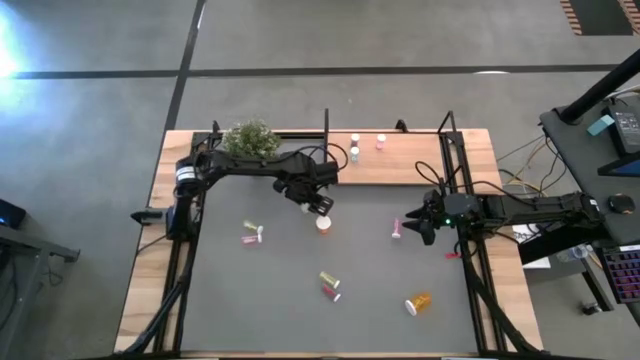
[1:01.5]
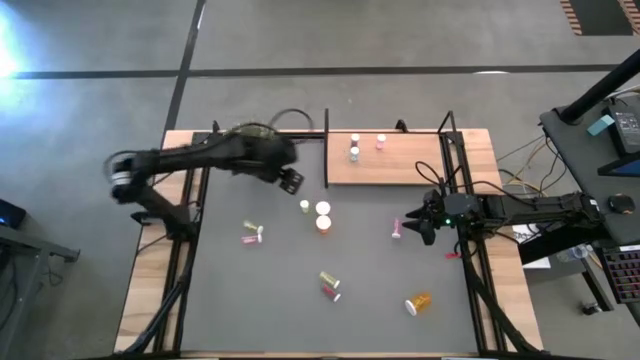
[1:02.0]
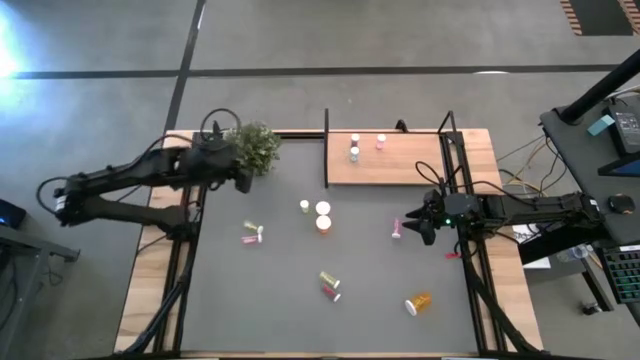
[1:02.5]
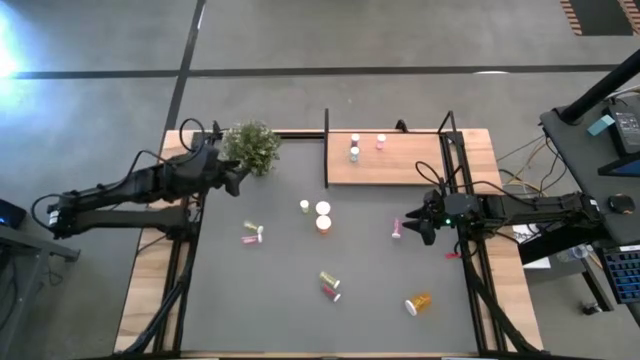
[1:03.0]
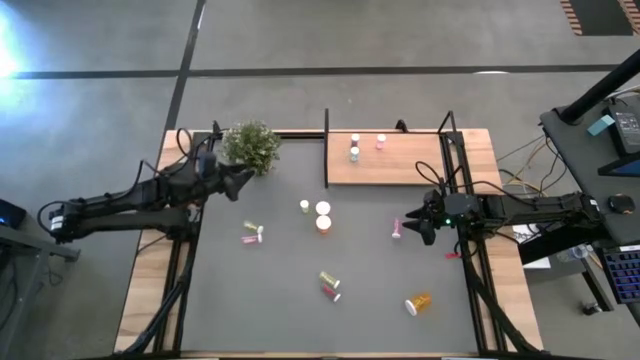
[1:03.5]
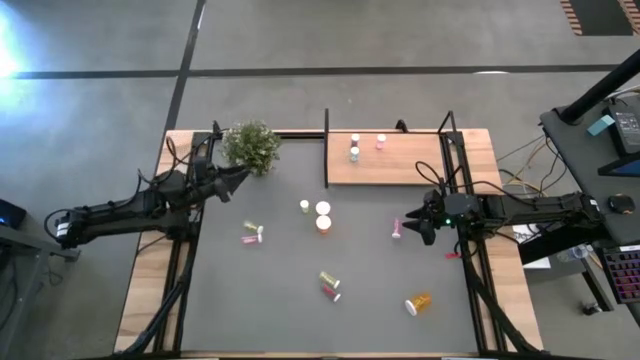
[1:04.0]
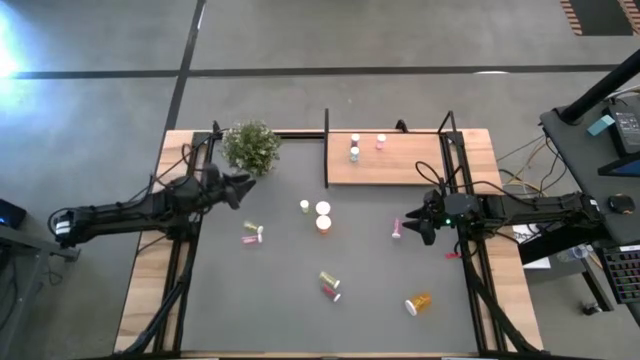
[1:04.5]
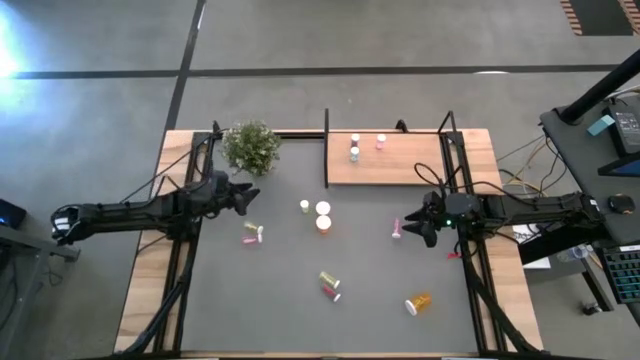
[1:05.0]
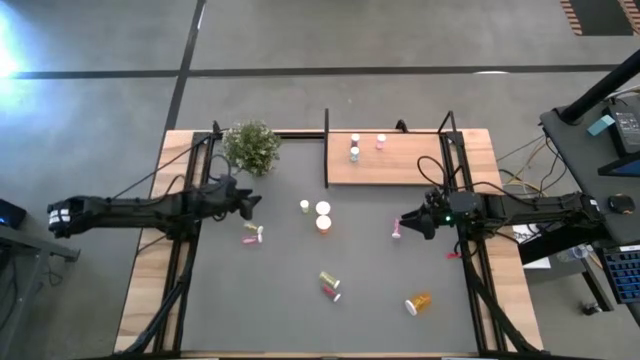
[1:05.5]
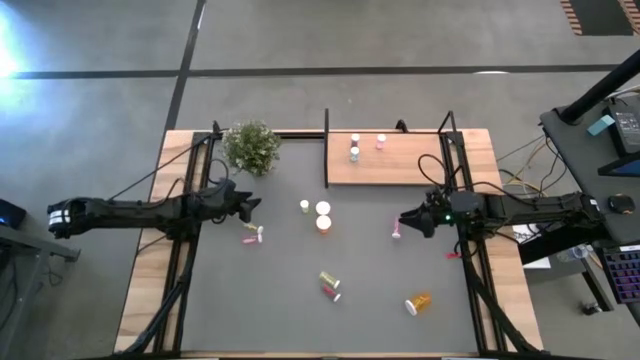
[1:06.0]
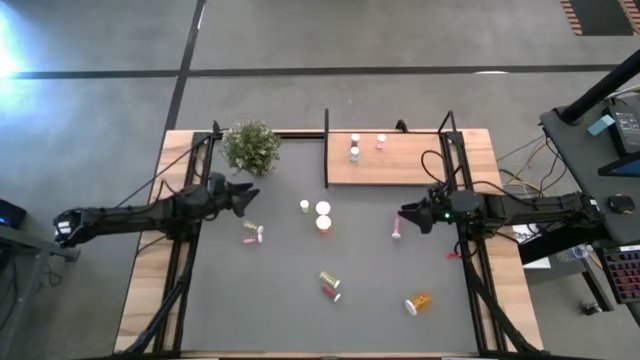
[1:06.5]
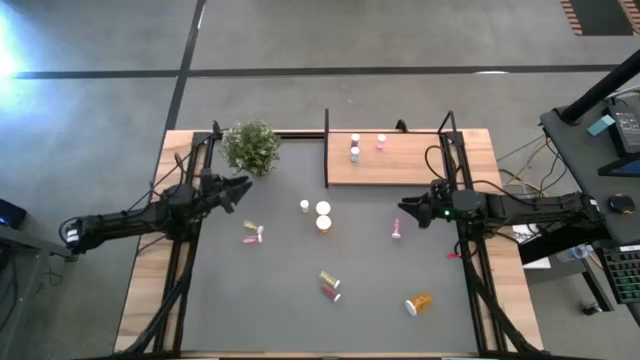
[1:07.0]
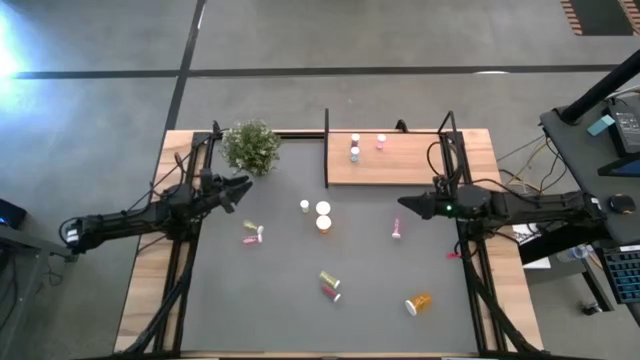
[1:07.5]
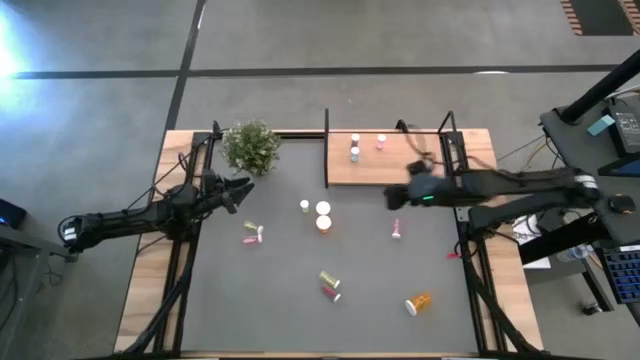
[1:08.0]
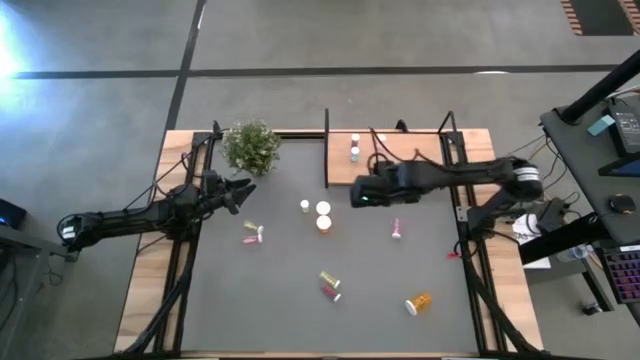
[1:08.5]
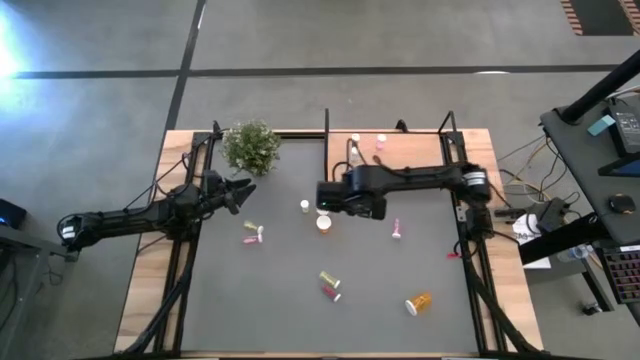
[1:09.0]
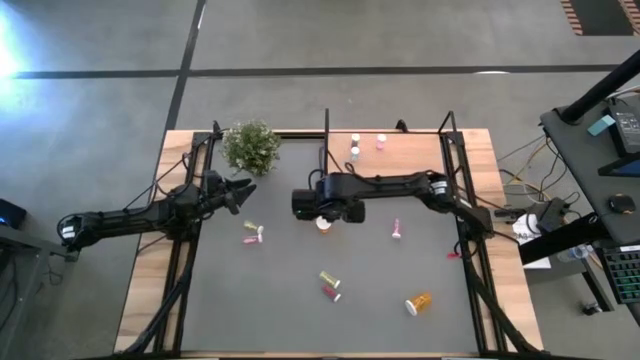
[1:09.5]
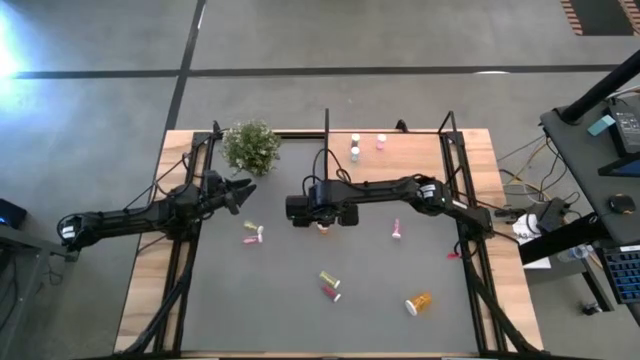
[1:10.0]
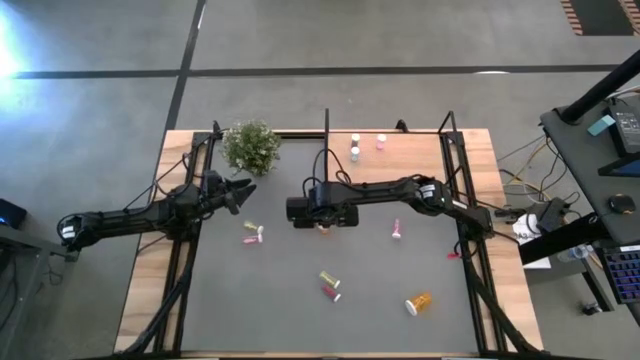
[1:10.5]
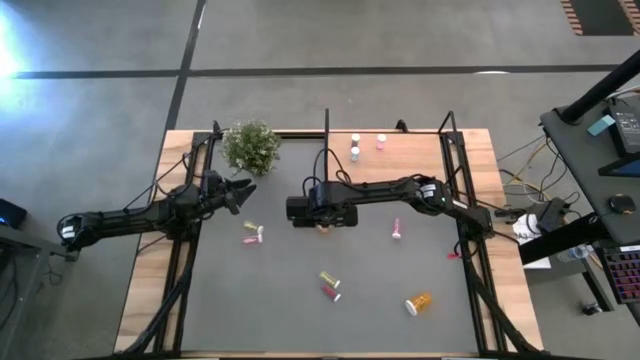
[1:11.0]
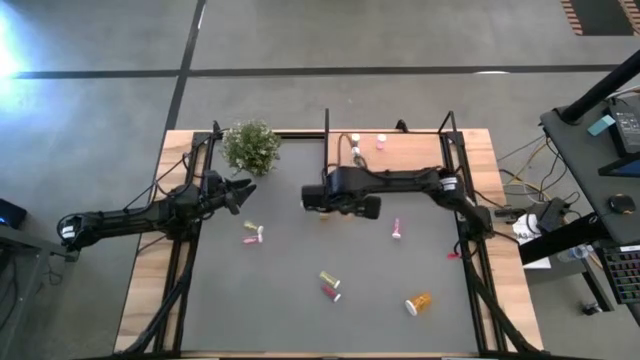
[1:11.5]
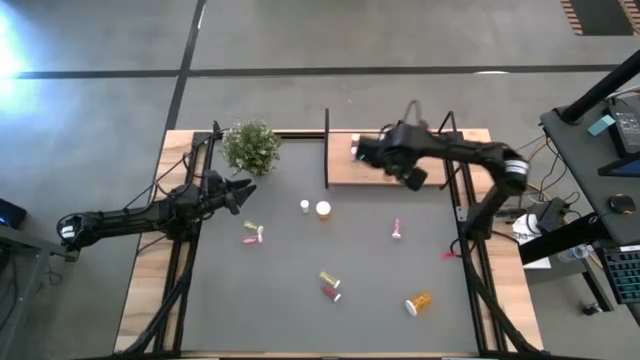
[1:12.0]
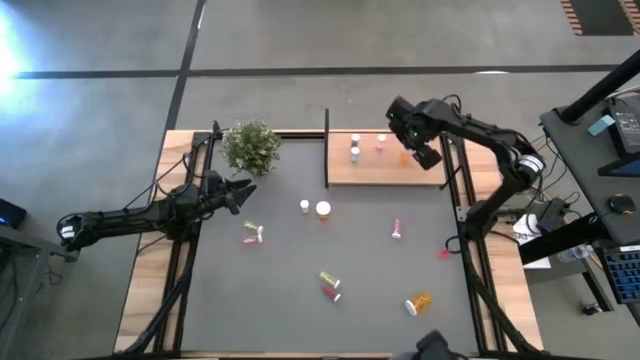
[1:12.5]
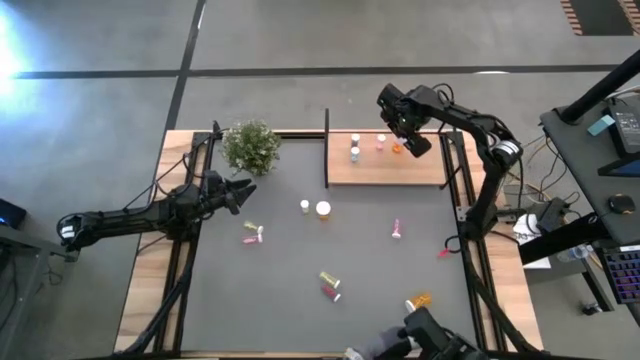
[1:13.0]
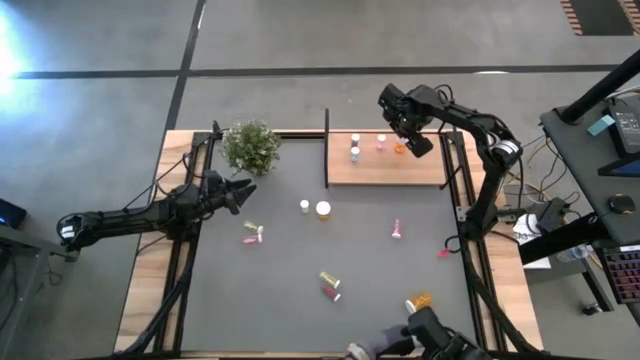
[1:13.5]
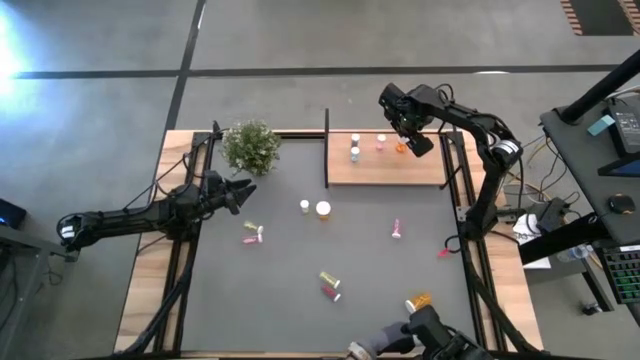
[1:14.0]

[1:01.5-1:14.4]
Task: Pick and place medicine bottles onto shelf by color
Put the middle orange pill bottle on the shelf

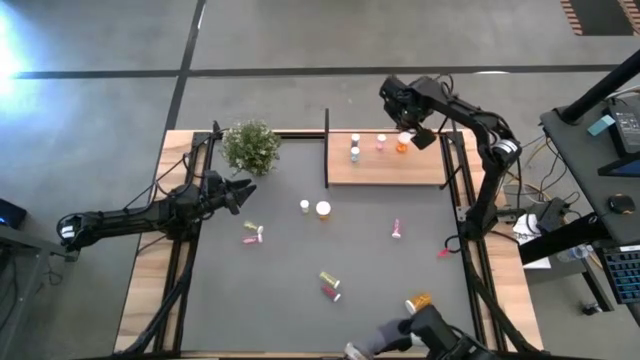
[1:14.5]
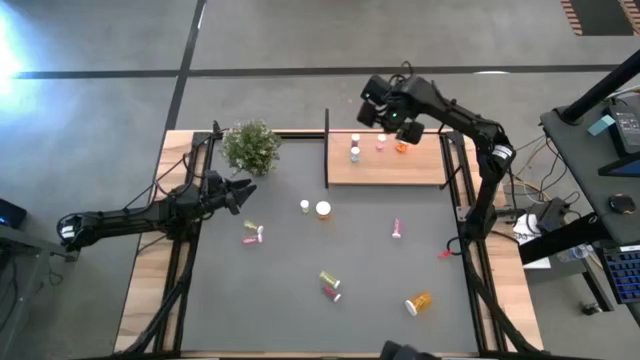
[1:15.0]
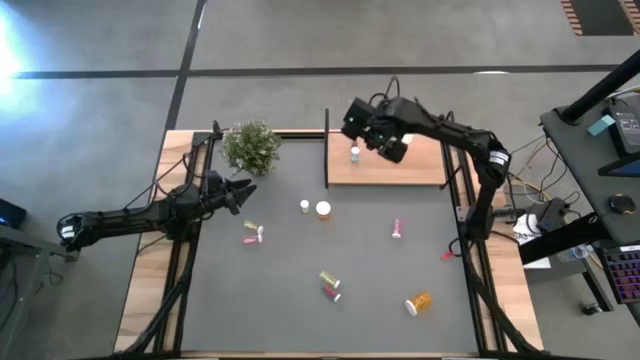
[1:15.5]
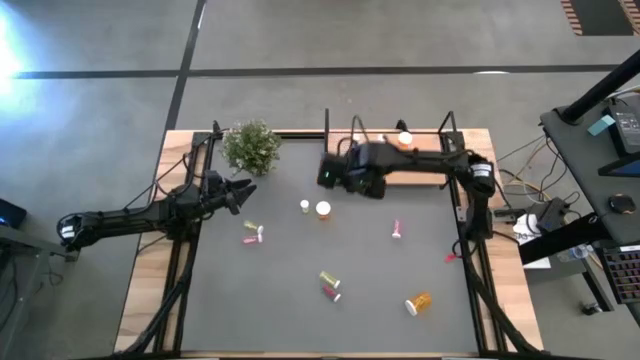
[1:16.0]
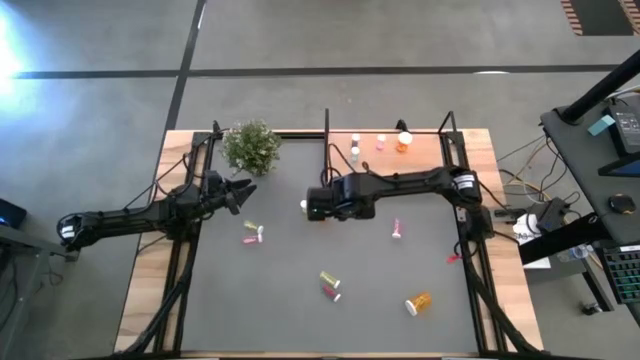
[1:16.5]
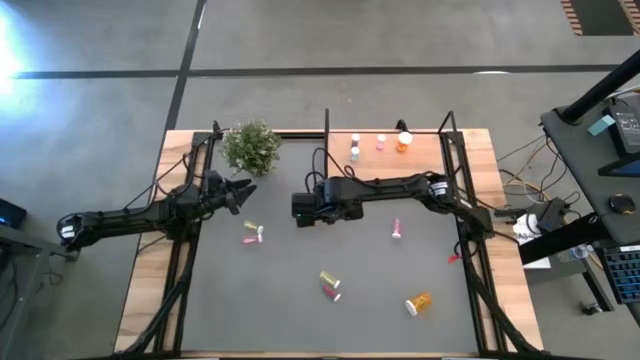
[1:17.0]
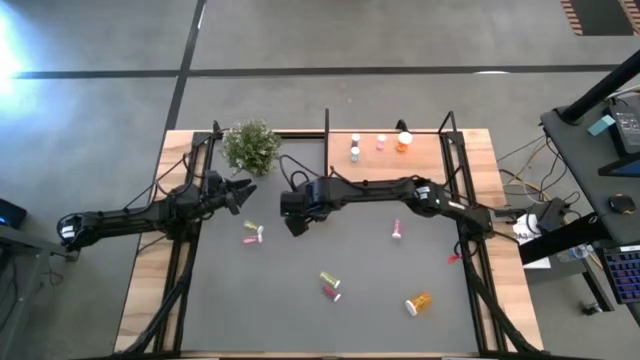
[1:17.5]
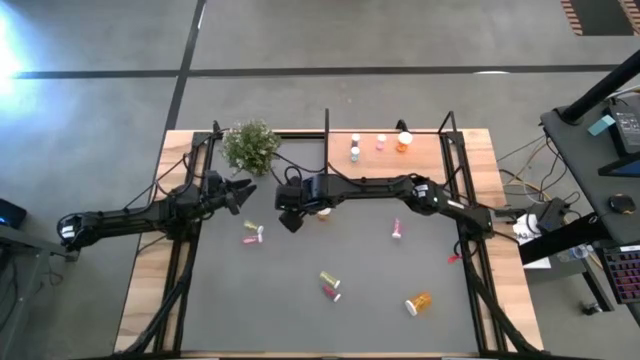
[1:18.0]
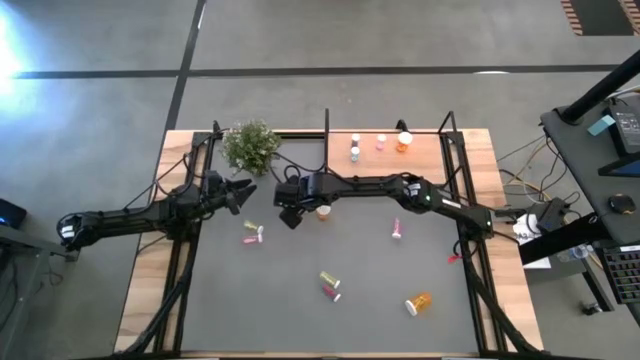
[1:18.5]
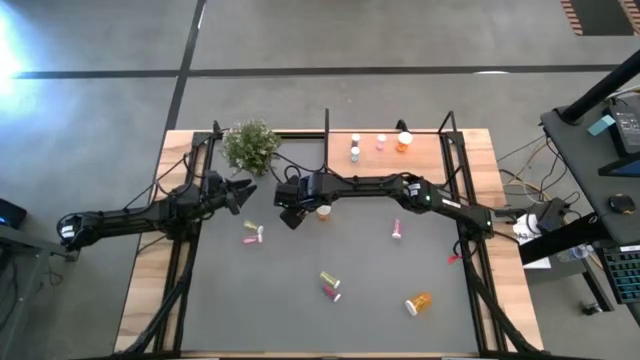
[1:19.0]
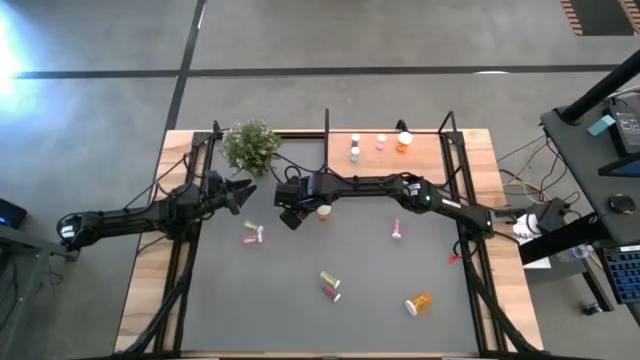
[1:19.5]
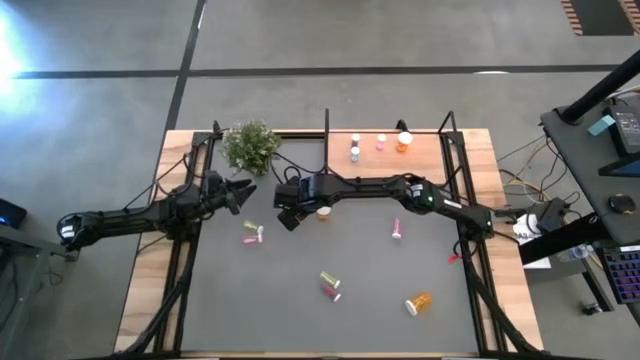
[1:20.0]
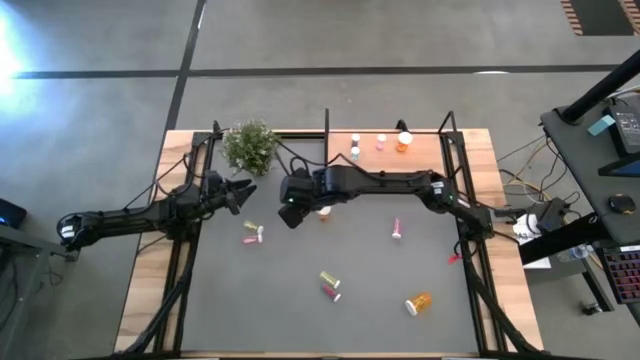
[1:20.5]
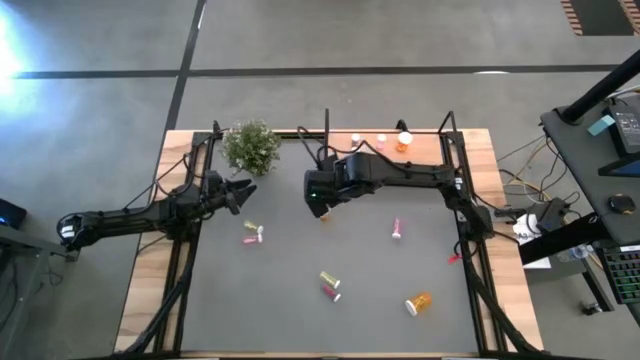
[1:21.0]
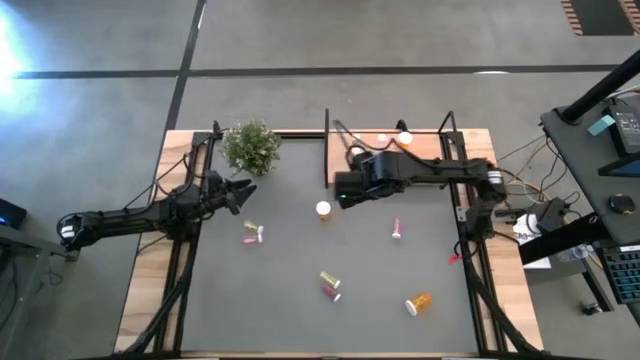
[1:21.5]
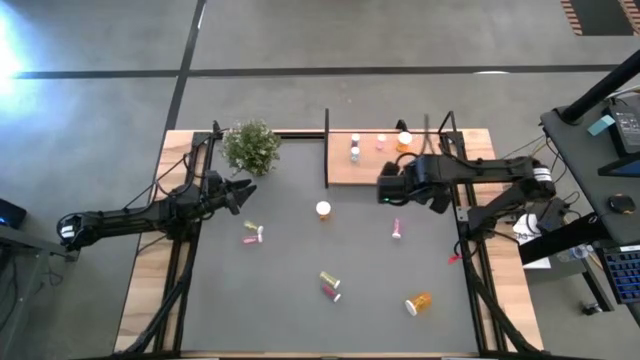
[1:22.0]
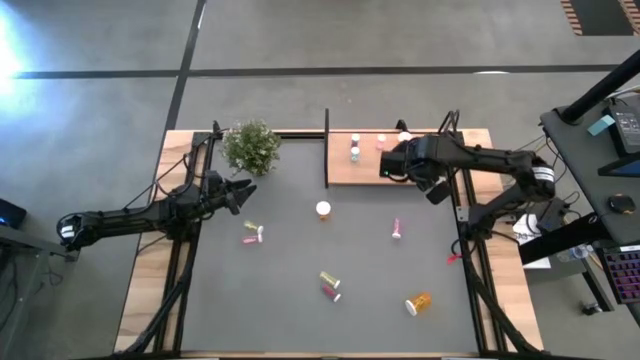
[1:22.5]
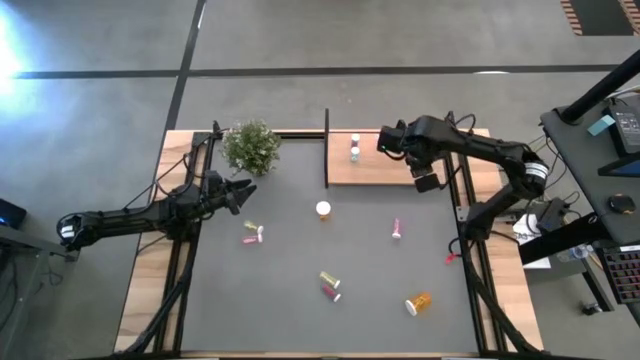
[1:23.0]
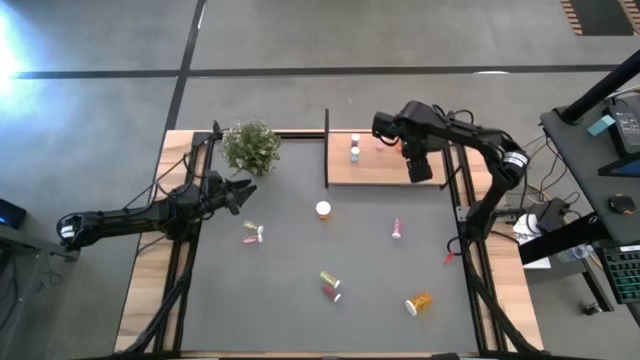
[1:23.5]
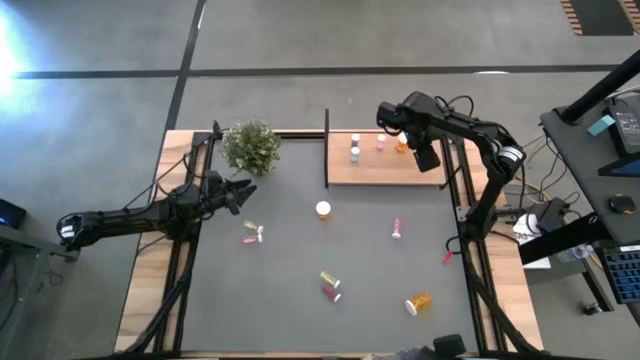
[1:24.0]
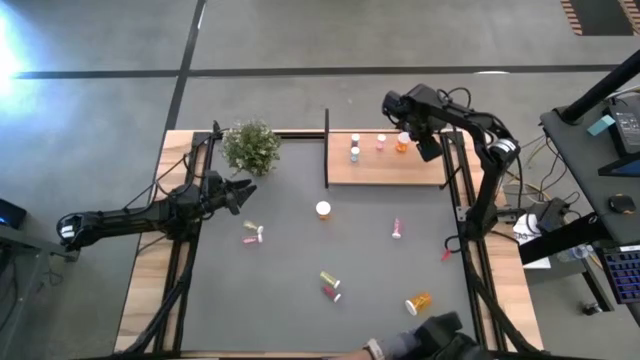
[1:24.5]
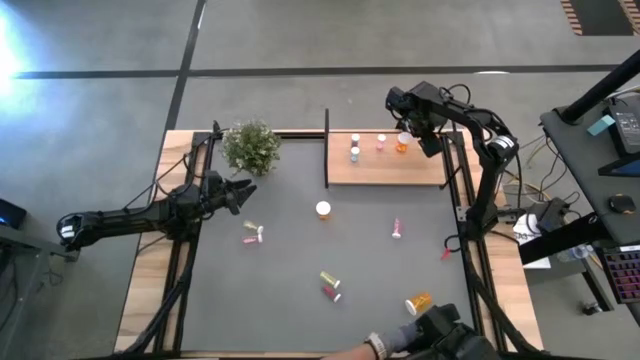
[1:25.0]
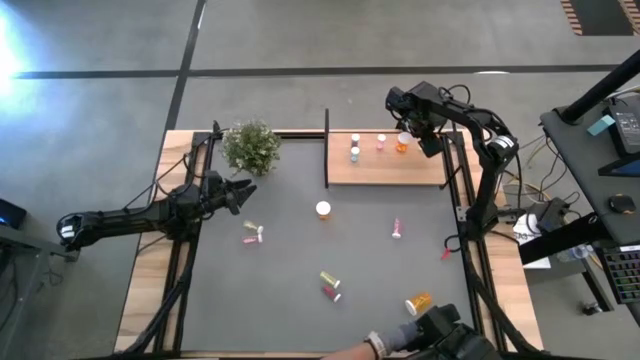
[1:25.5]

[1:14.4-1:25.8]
Put the top yellow pill bottle on the shelf
